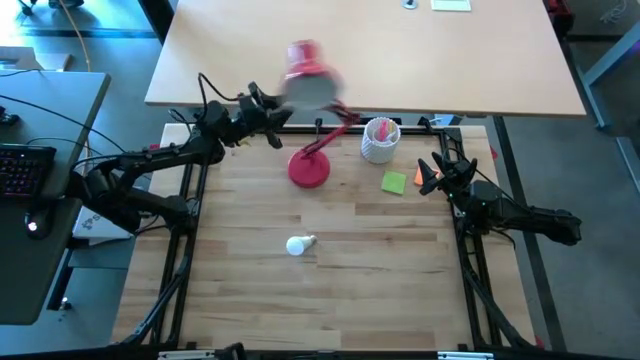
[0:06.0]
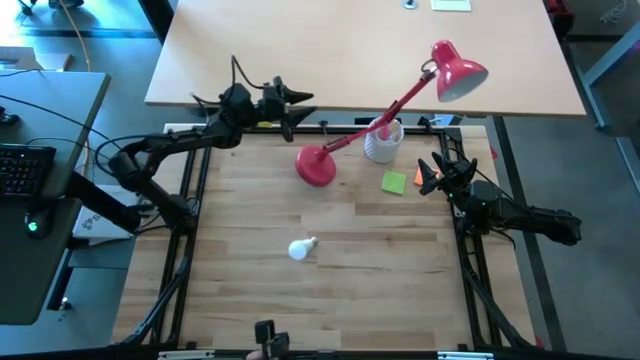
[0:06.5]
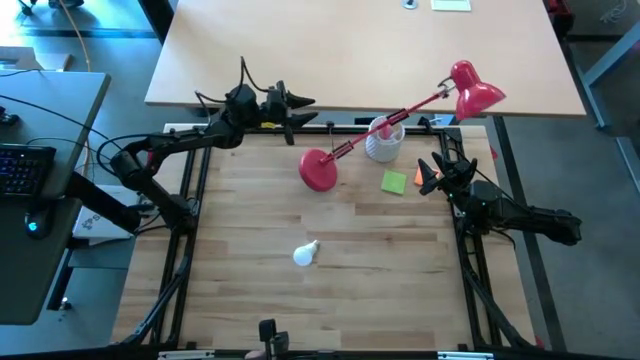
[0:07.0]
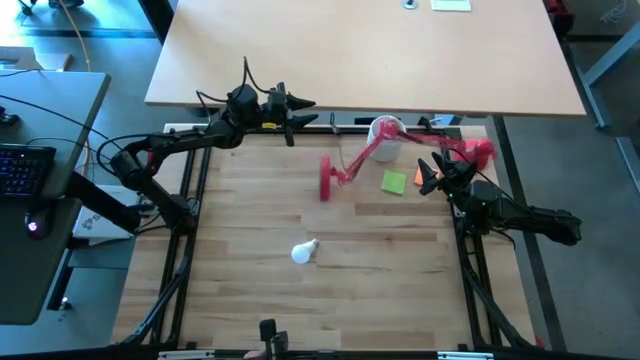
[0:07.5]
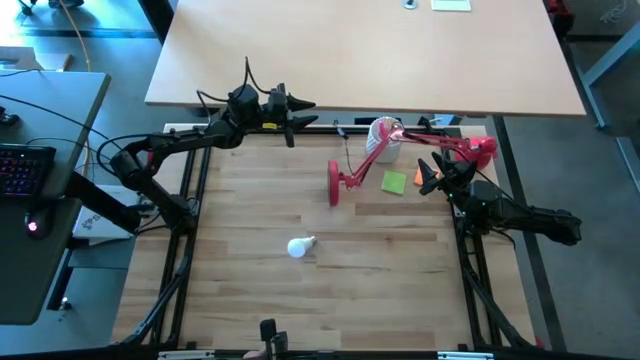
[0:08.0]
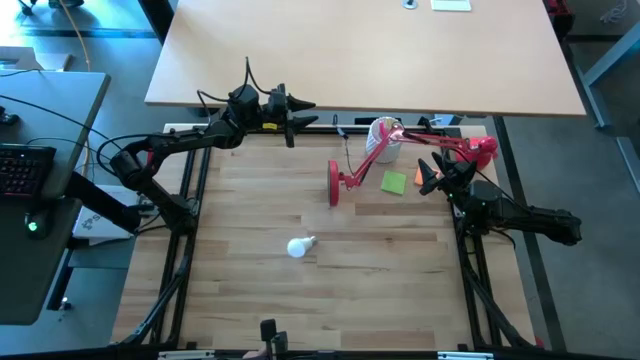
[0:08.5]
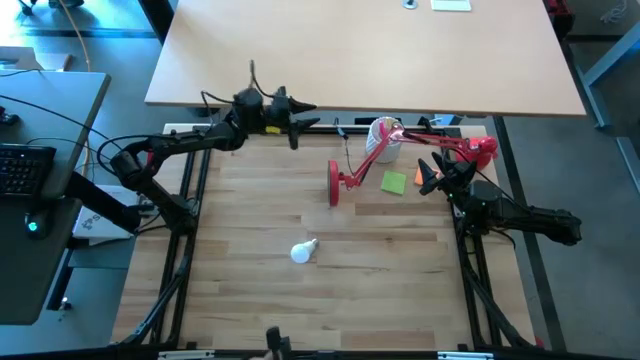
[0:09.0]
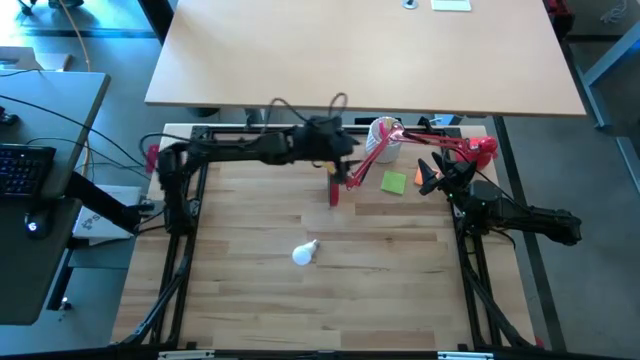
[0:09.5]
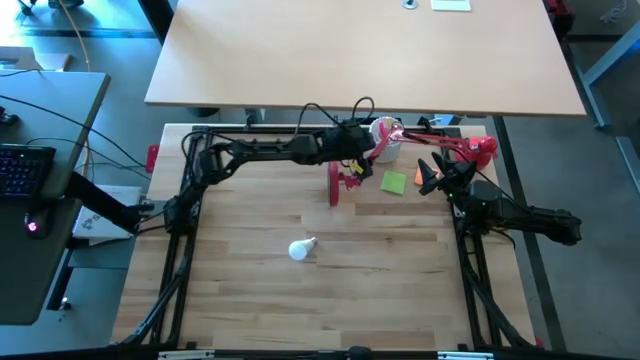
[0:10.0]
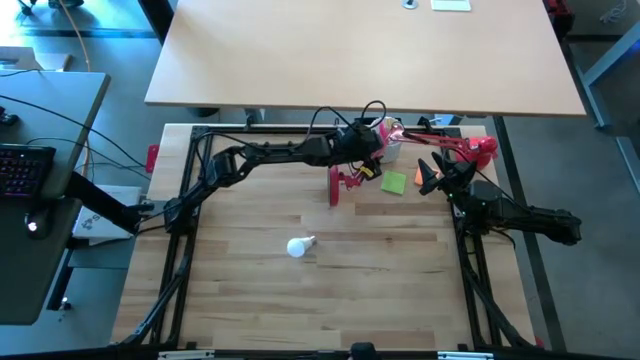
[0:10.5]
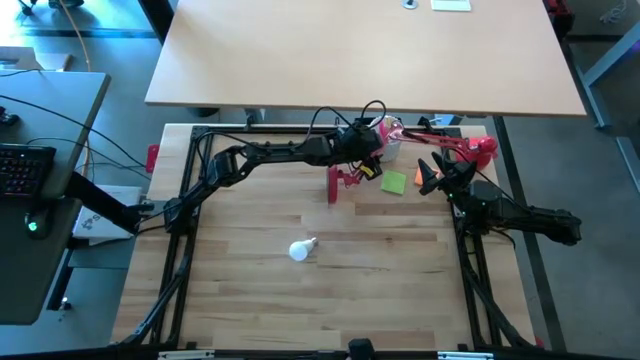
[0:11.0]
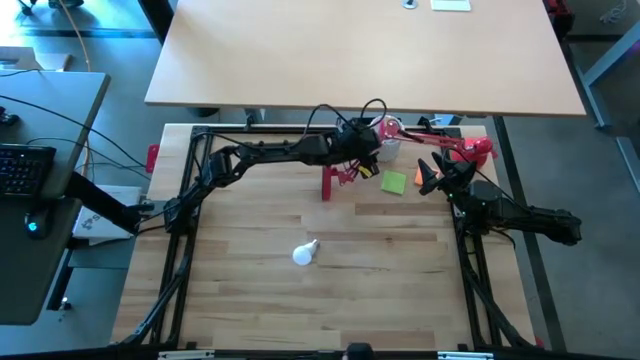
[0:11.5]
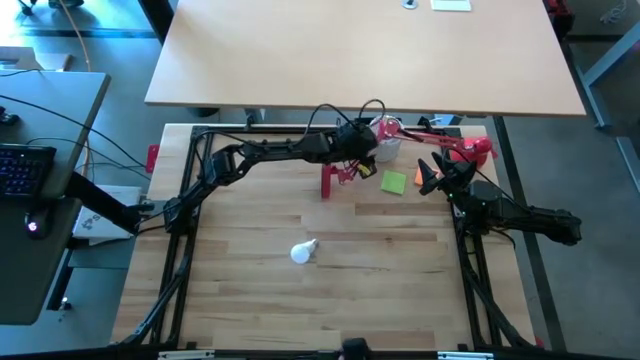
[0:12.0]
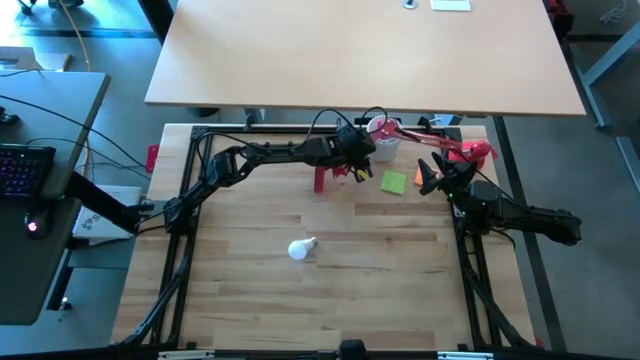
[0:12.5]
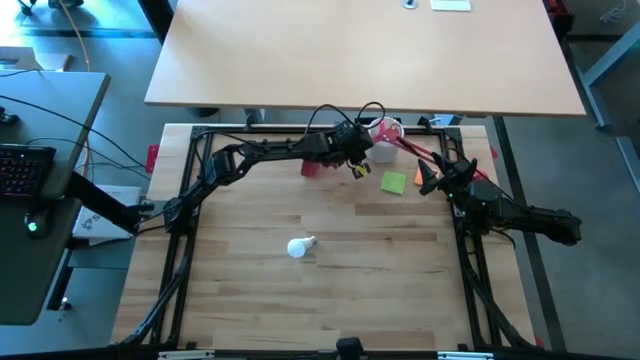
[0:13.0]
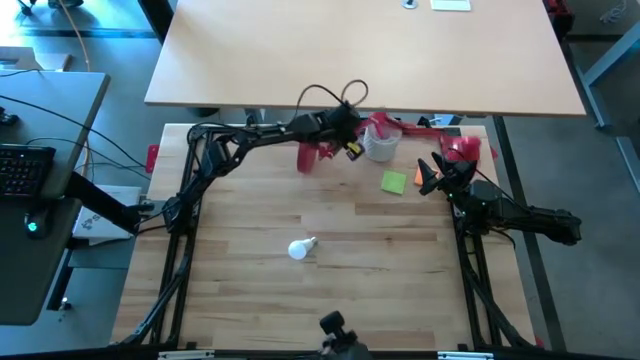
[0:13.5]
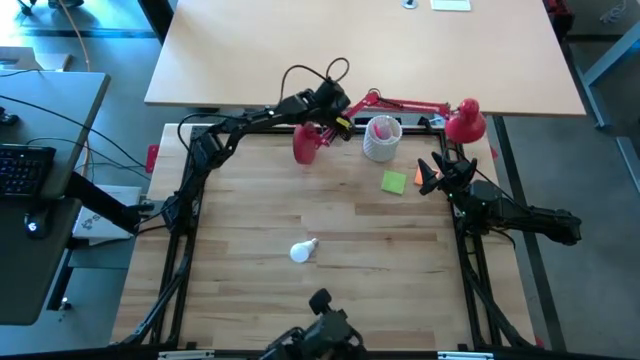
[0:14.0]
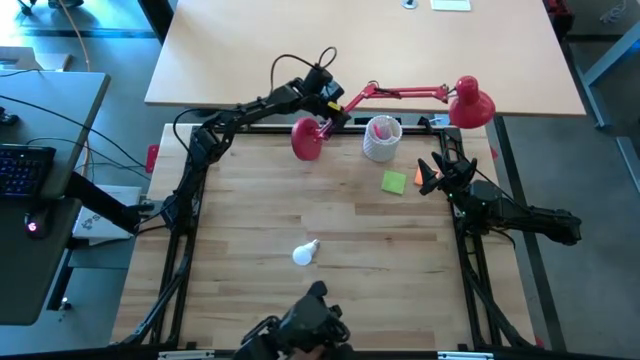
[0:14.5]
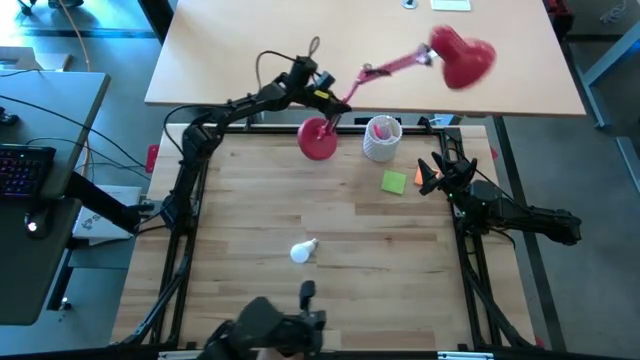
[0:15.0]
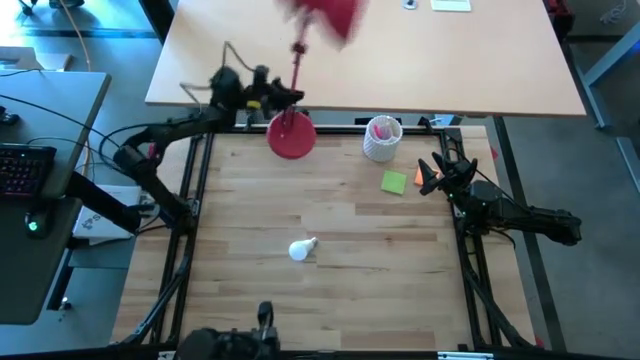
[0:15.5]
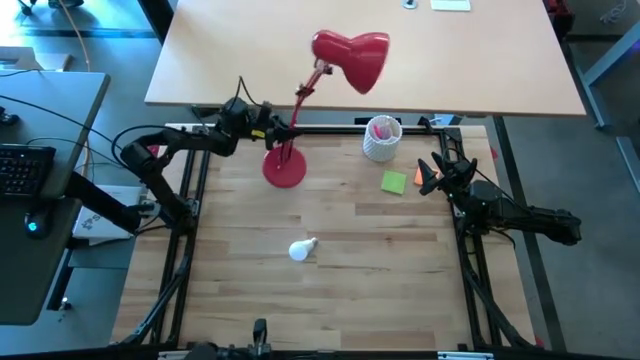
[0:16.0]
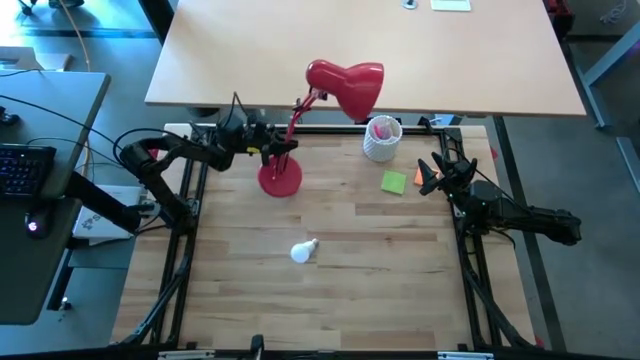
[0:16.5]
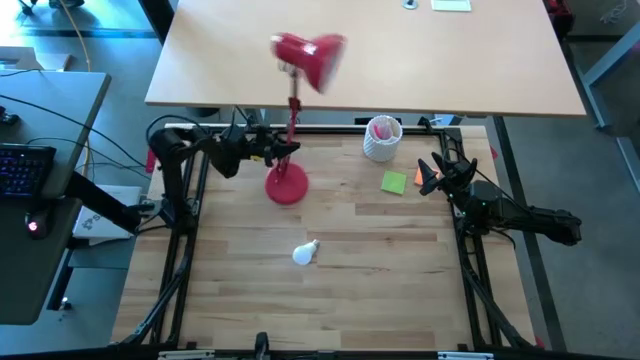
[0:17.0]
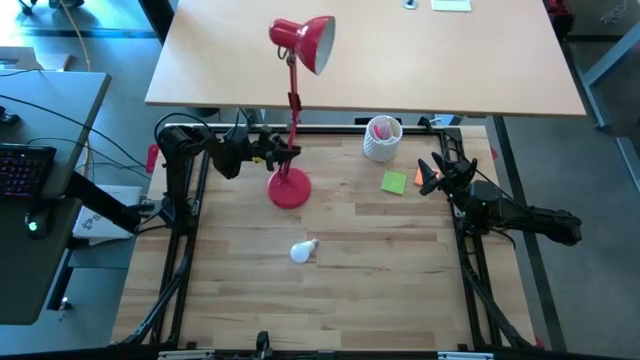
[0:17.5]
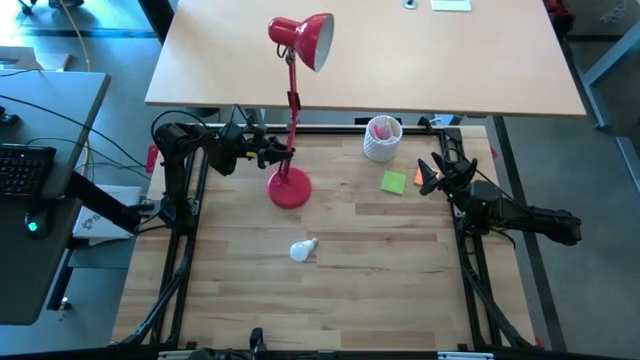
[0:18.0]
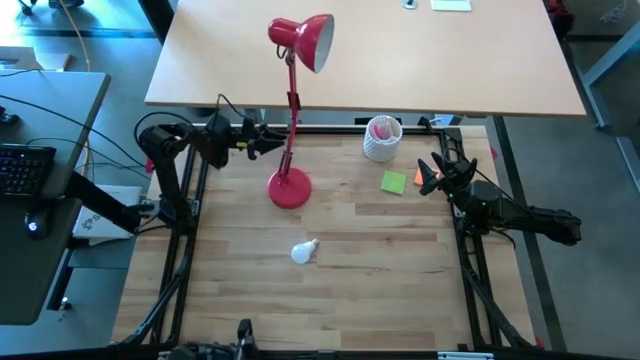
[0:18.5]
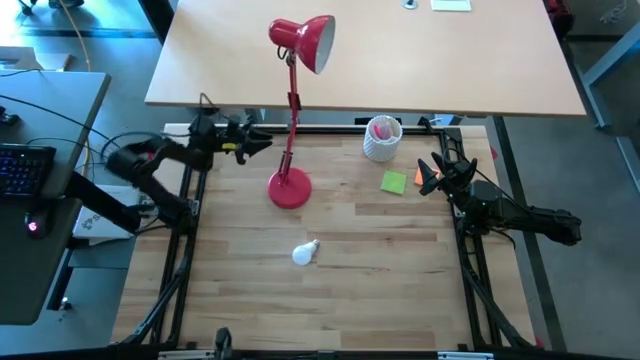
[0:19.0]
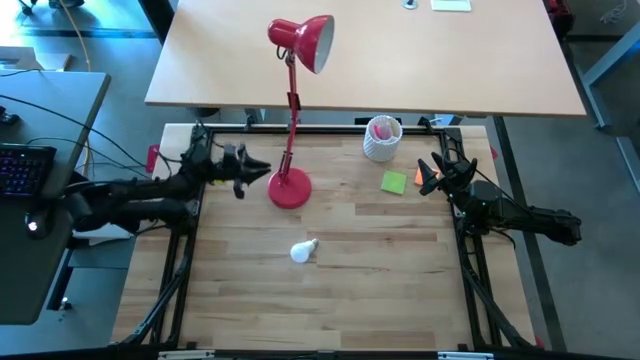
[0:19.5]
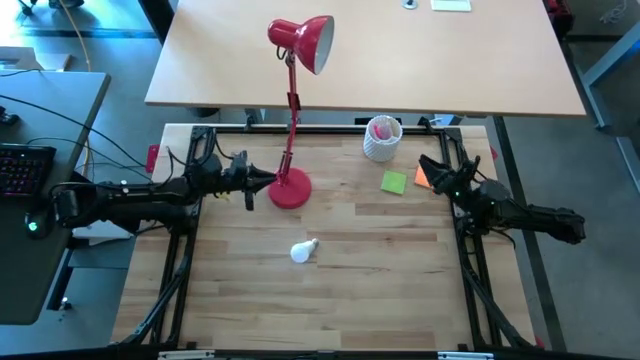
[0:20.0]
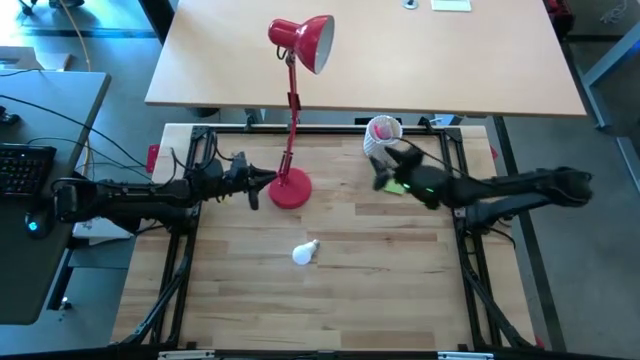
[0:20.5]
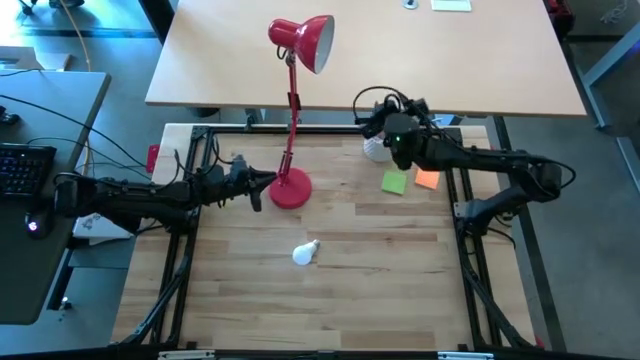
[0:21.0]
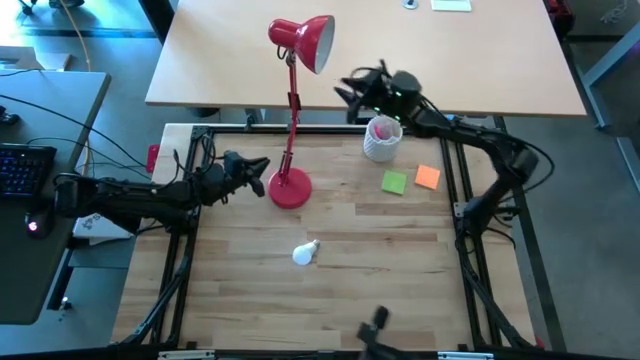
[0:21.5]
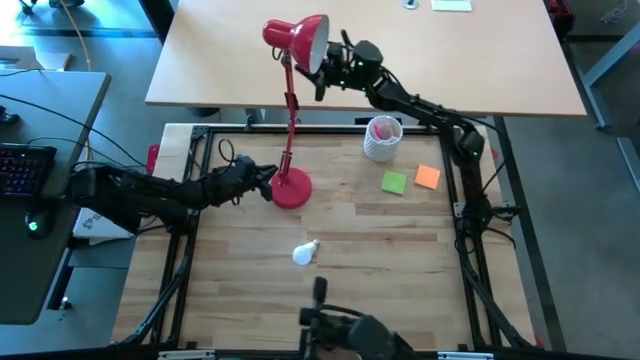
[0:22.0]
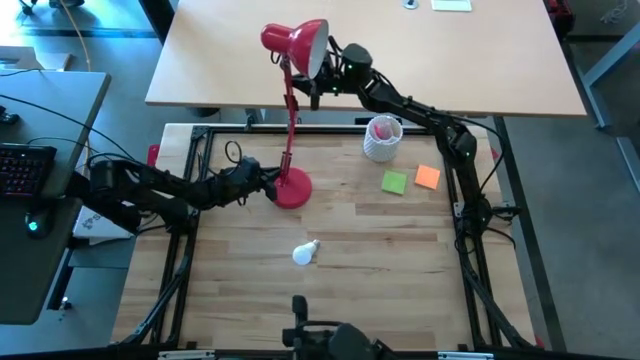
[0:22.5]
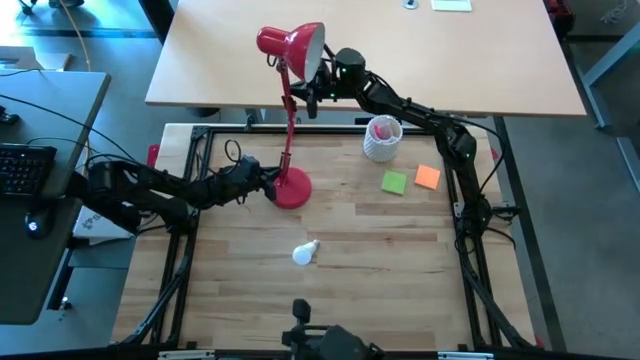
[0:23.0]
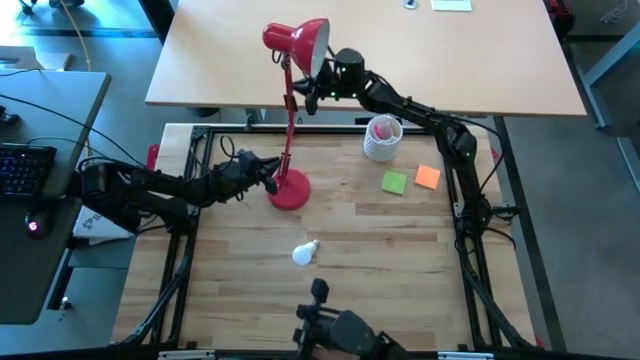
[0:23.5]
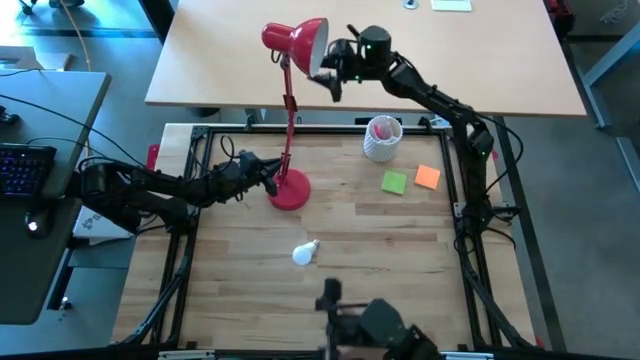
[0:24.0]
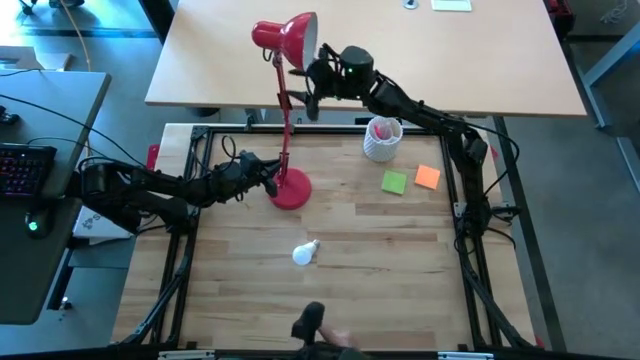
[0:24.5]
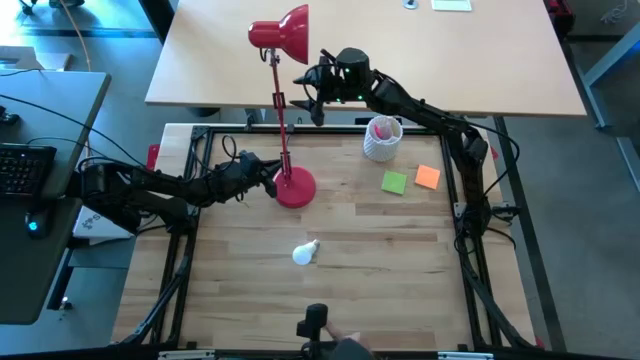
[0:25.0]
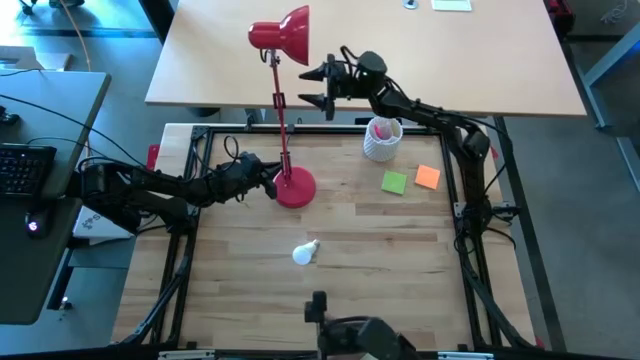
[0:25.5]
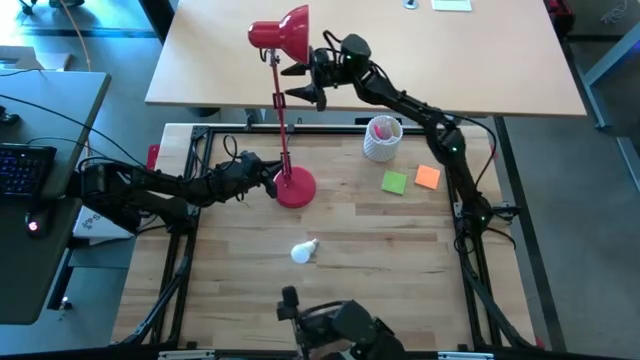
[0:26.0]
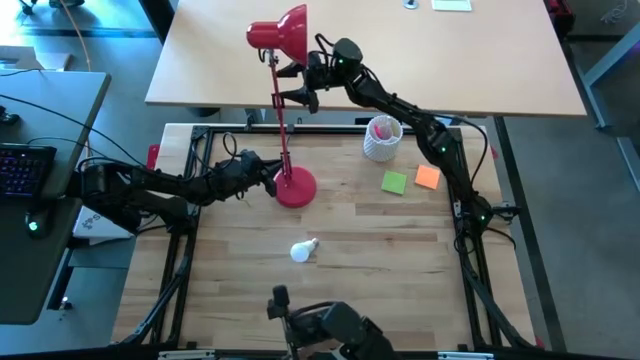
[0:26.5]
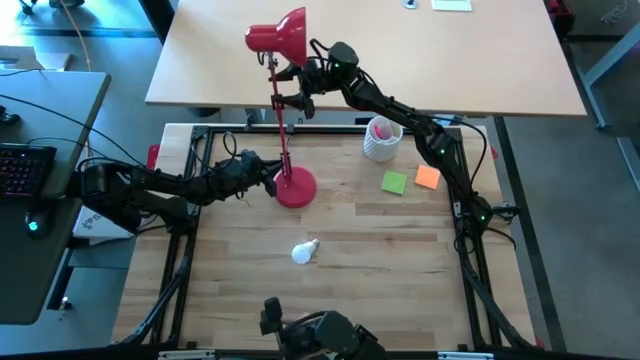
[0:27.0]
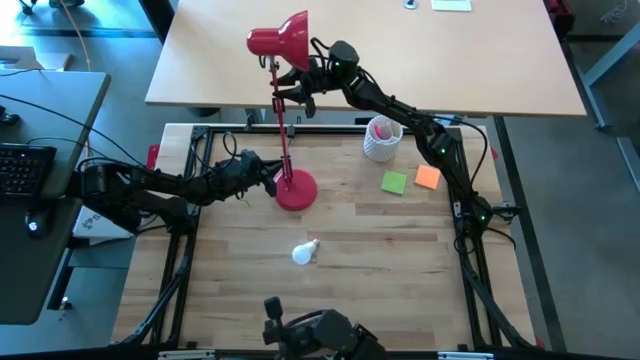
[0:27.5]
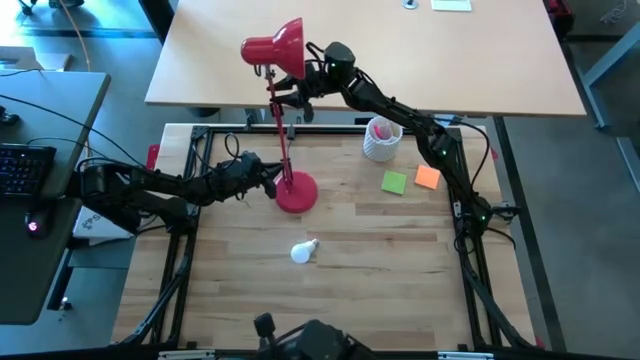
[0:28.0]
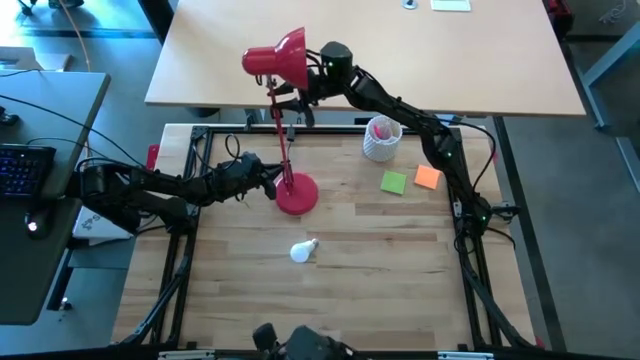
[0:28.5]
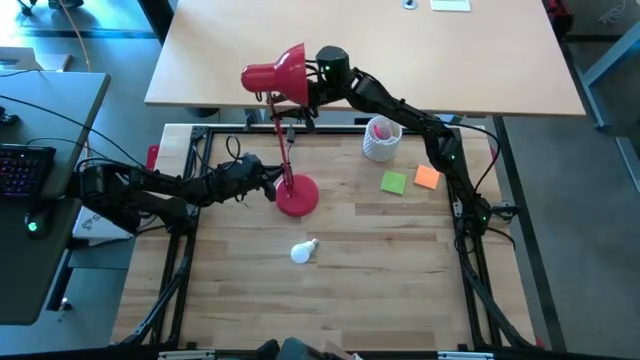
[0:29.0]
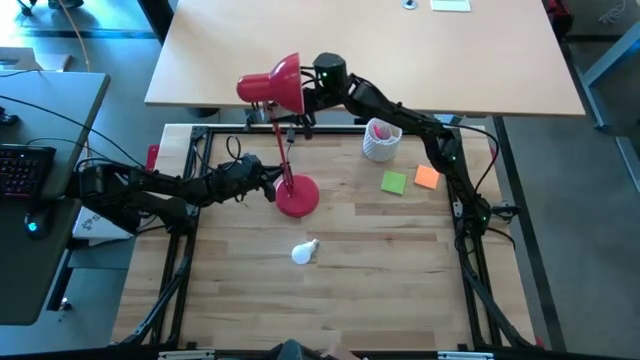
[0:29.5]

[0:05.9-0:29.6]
Task: Screw lightbulb
Adjust the red lamp
